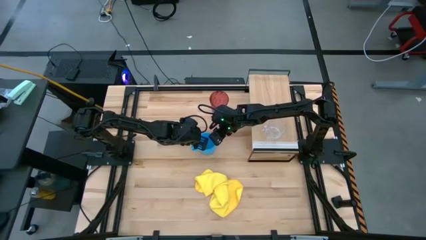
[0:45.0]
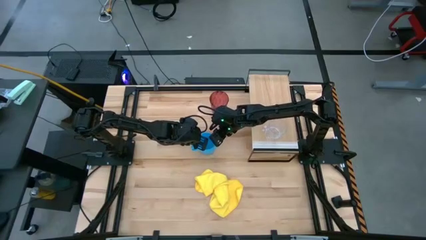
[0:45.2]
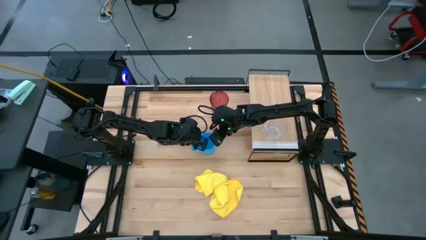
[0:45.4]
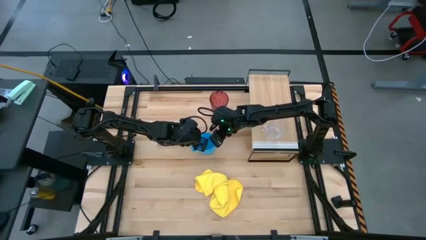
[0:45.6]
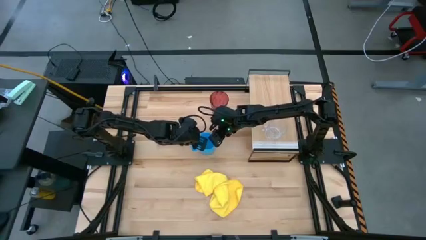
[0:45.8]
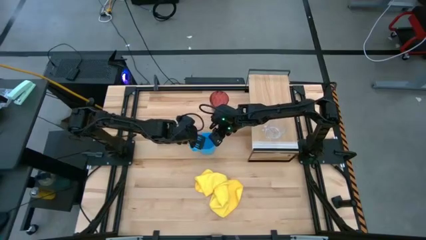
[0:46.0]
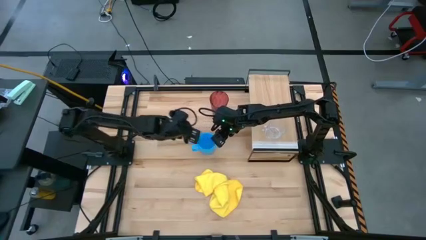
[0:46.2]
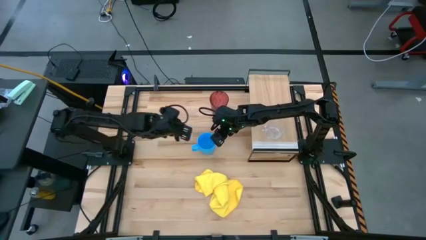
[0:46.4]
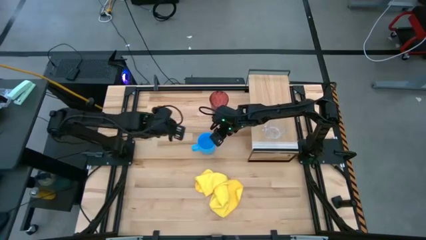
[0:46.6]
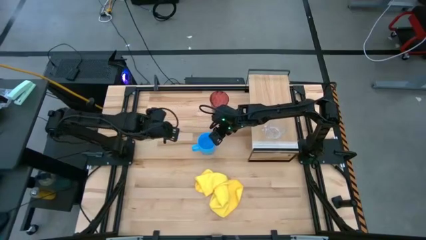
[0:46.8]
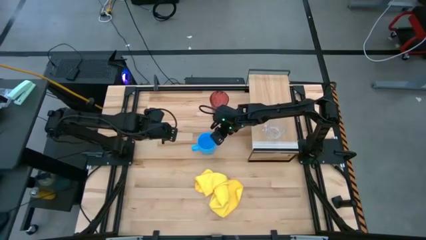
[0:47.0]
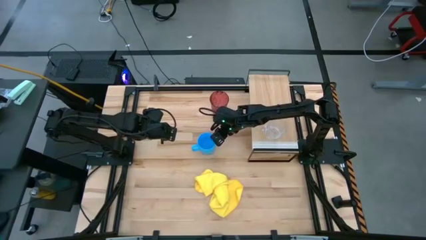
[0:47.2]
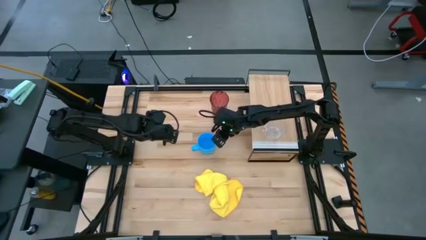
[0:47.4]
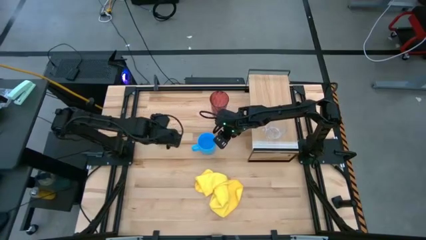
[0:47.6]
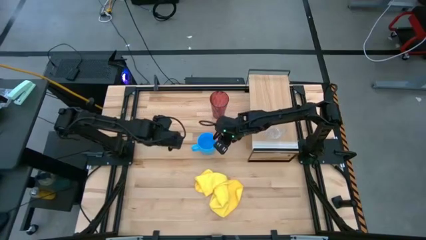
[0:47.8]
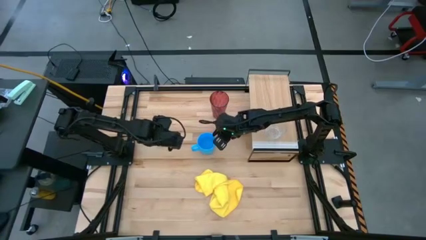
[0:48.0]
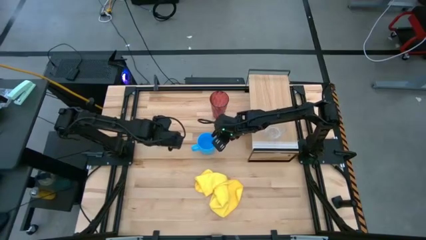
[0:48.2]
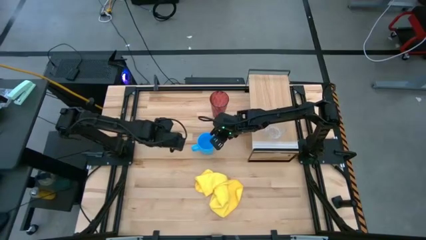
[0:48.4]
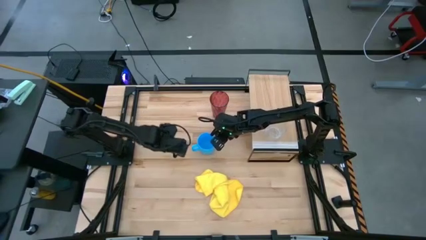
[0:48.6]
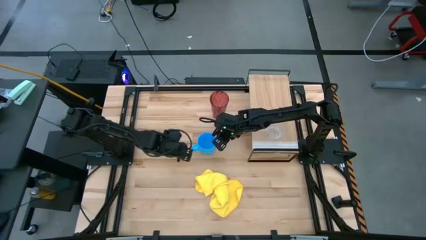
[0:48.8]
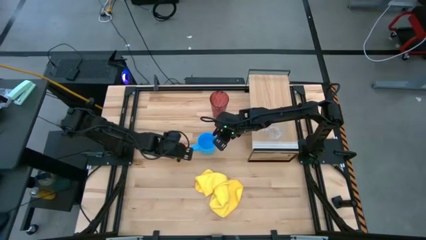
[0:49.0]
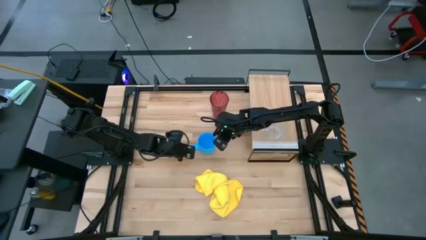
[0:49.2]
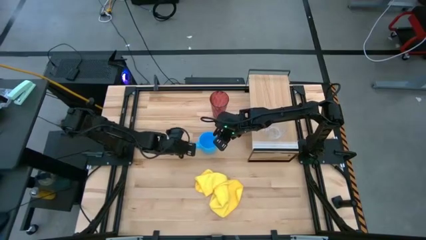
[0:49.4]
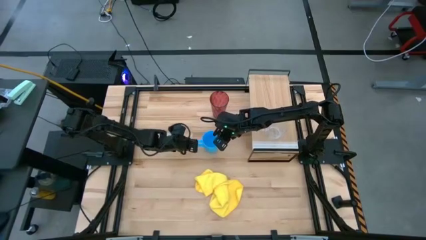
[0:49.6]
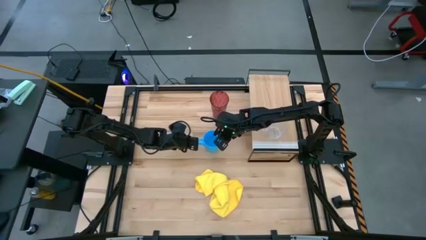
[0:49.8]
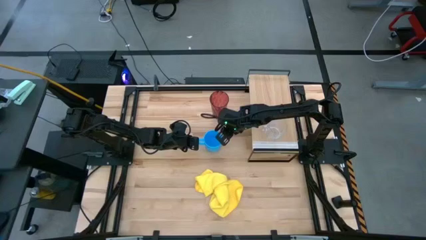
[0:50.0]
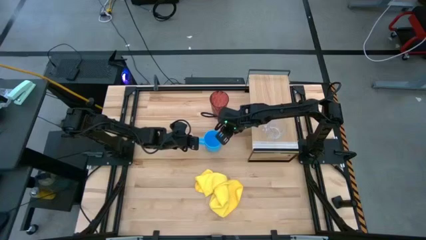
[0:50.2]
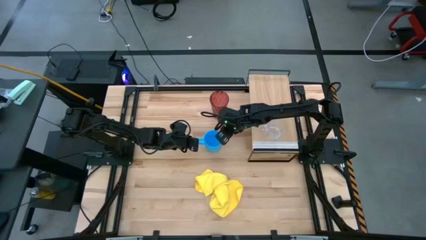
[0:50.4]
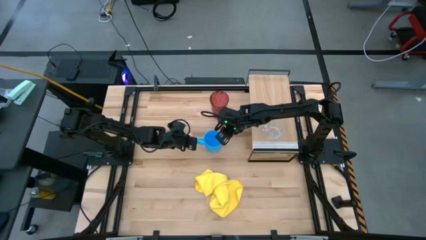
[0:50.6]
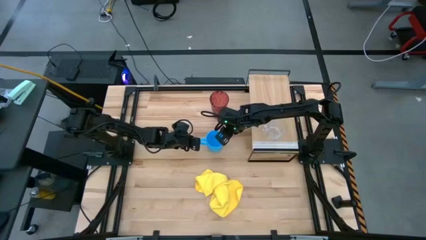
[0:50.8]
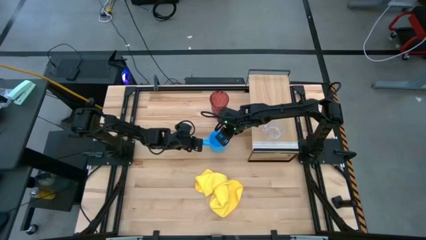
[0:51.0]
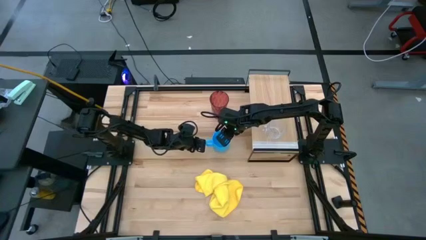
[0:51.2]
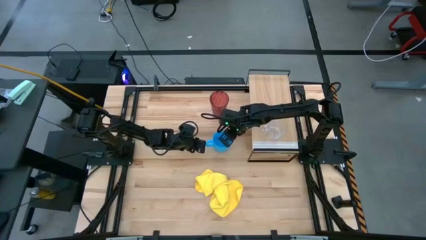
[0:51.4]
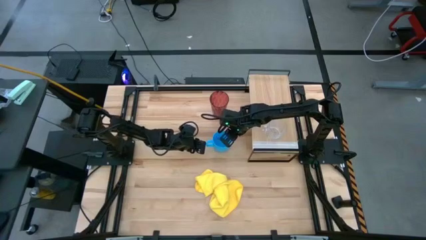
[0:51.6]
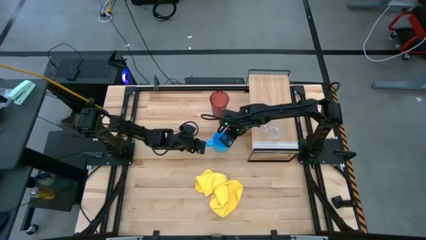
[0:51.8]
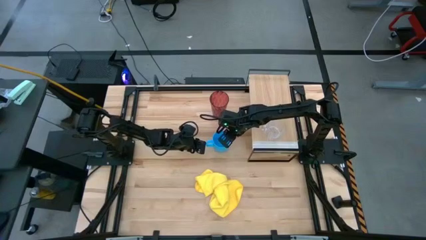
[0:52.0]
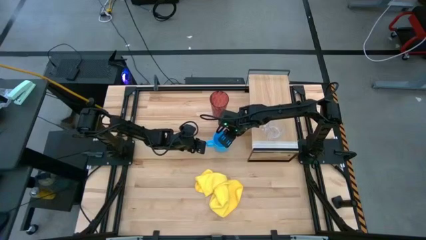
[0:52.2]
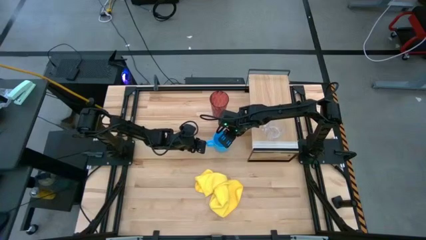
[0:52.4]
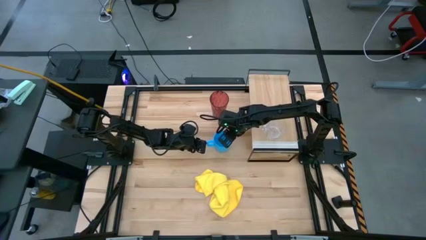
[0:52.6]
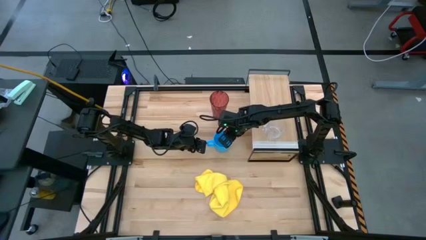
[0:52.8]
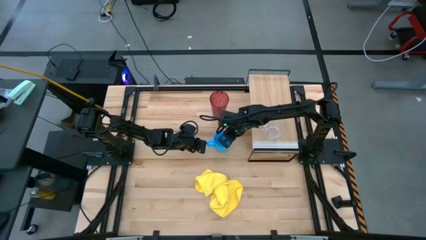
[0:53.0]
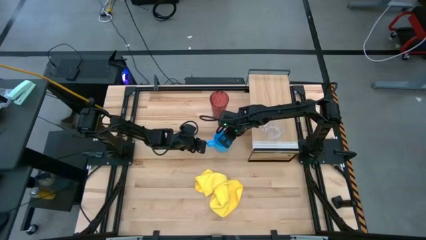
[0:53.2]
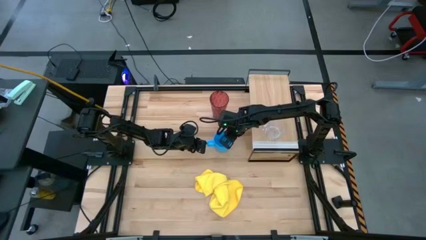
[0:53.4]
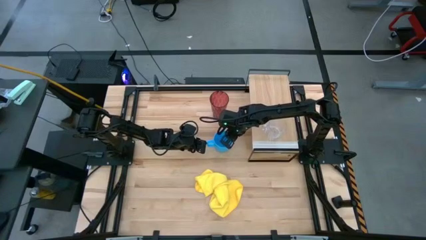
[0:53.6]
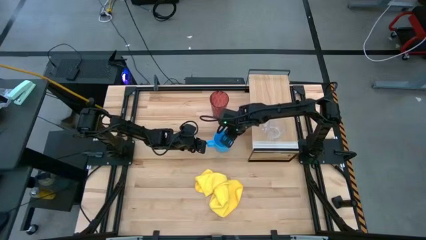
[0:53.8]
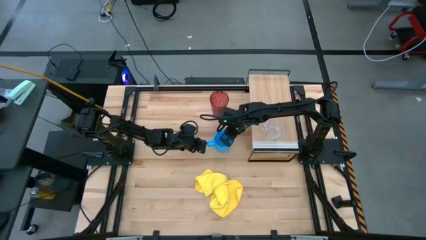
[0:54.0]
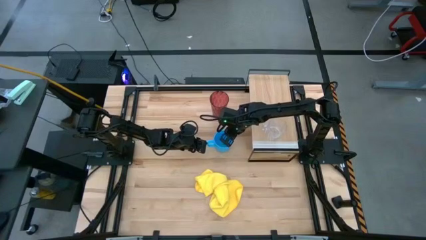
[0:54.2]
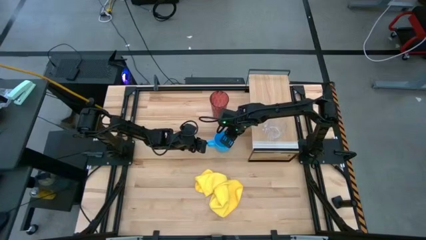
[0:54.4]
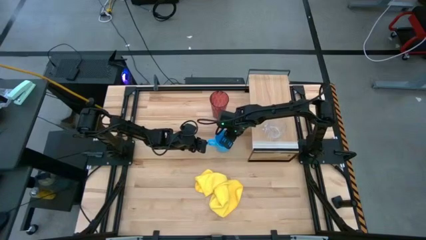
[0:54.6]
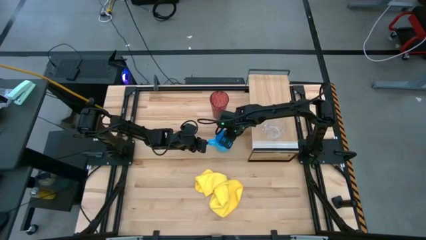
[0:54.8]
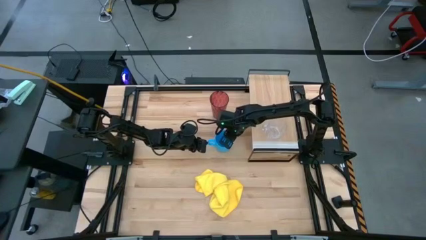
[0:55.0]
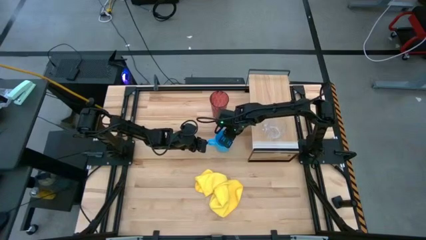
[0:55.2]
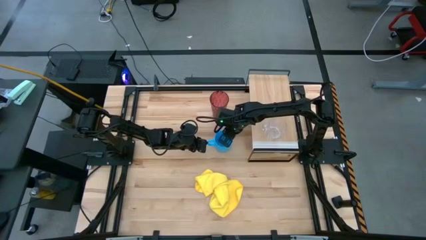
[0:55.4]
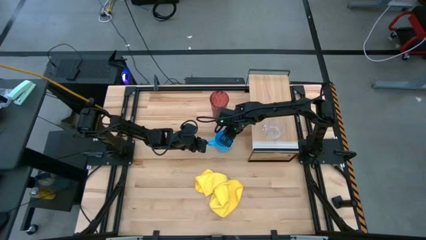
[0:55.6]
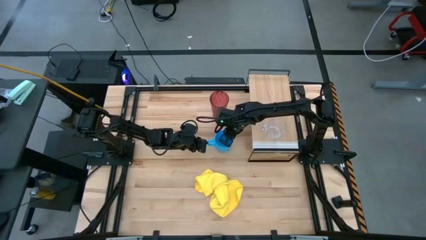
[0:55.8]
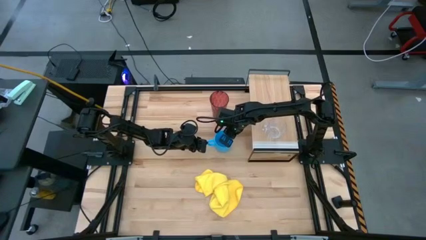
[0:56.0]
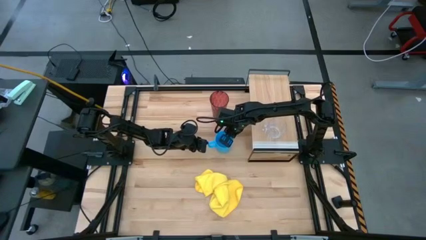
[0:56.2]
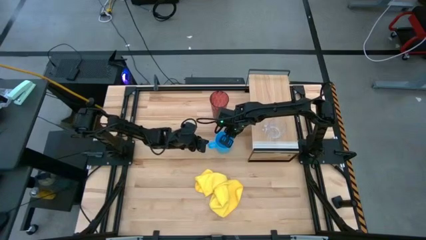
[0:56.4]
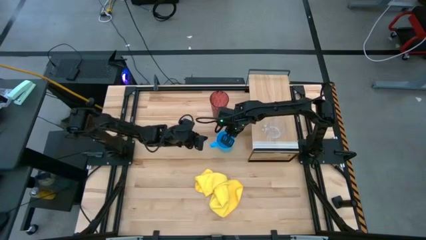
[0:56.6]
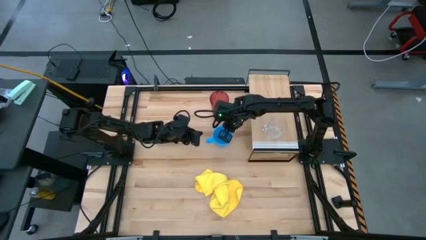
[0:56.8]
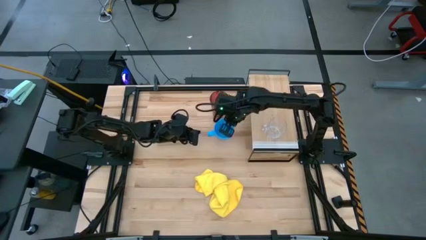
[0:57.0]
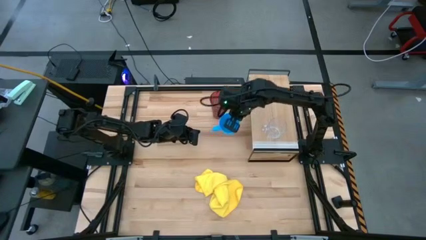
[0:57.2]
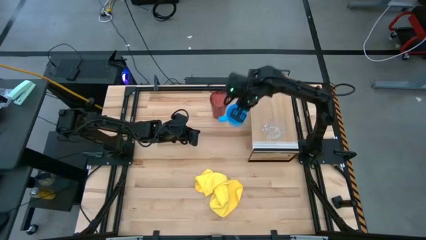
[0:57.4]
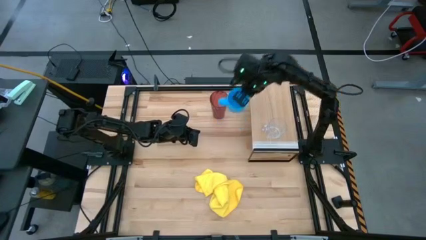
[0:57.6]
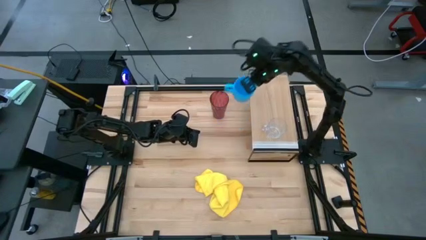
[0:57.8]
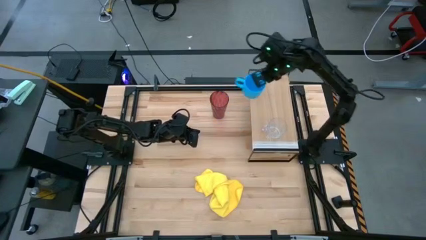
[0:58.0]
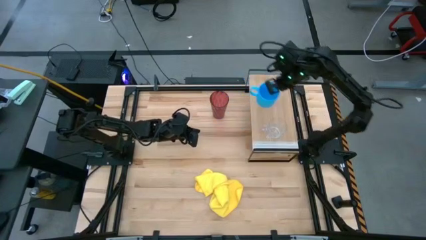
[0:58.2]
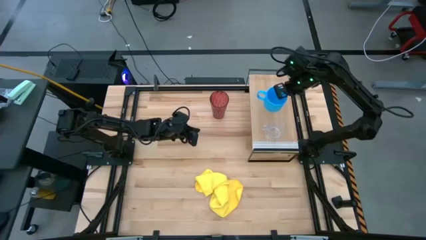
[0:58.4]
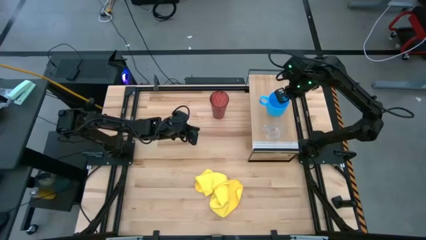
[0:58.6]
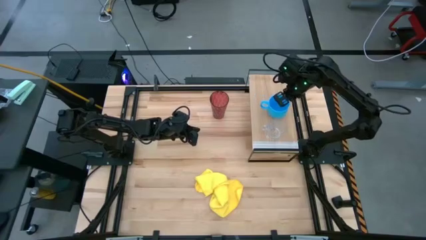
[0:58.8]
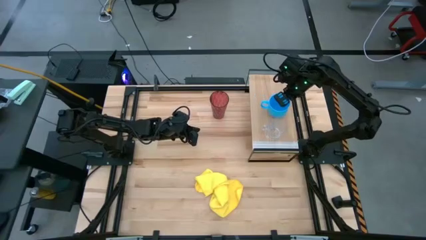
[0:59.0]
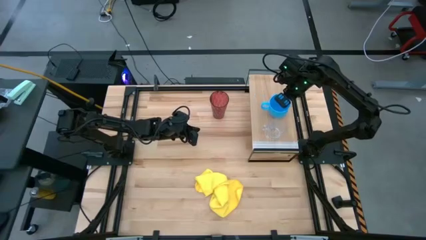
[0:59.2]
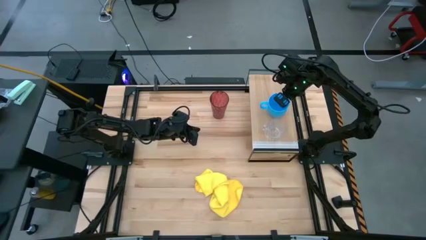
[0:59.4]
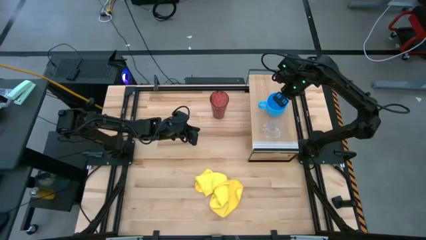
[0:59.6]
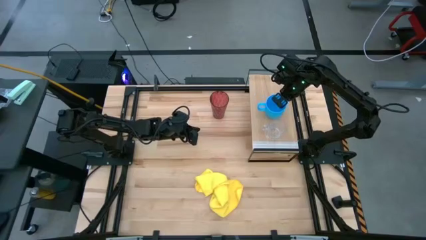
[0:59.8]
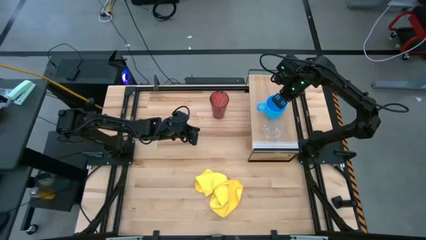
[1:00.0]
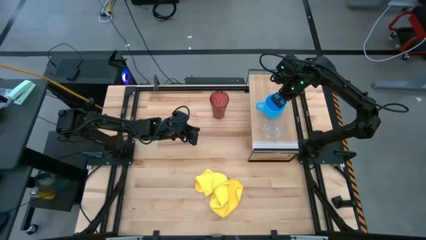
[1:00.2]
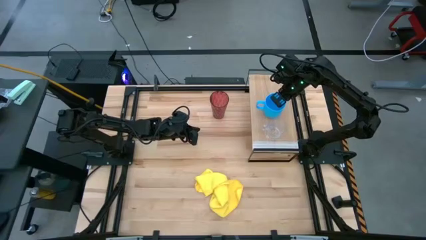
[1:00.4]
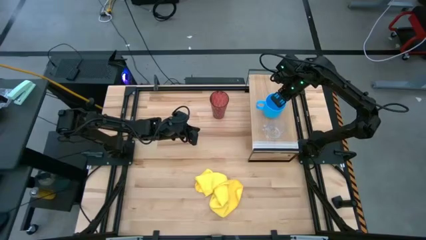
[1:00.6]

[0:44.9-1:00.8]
Task: Stack small to large cups/mugs on shelf
Put the blue mug on the shelf
